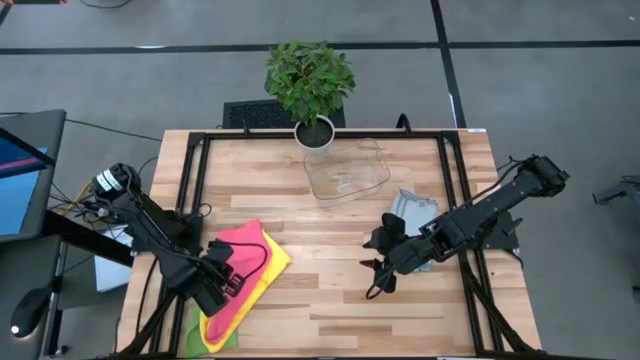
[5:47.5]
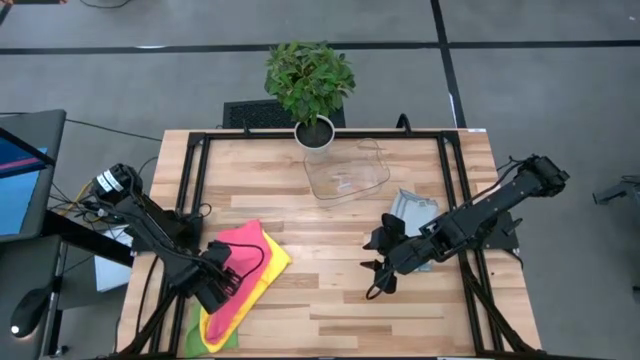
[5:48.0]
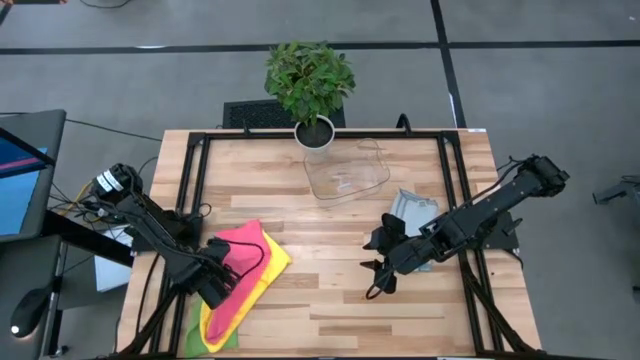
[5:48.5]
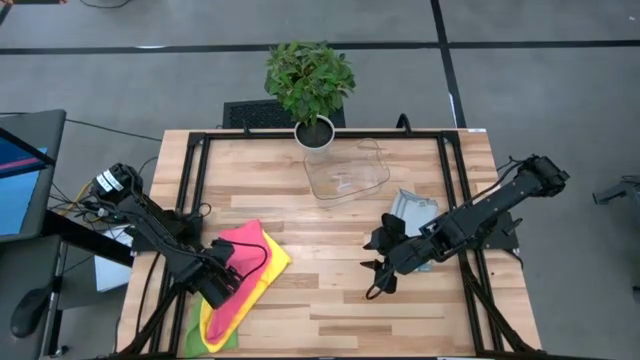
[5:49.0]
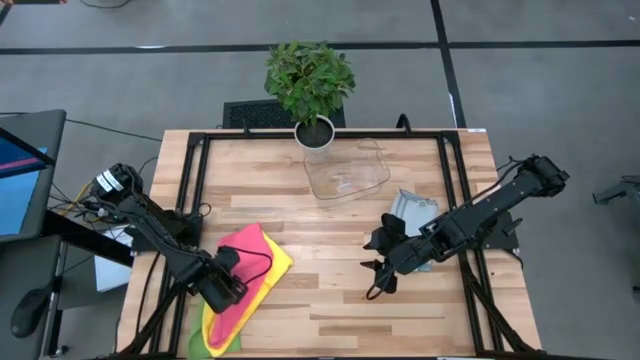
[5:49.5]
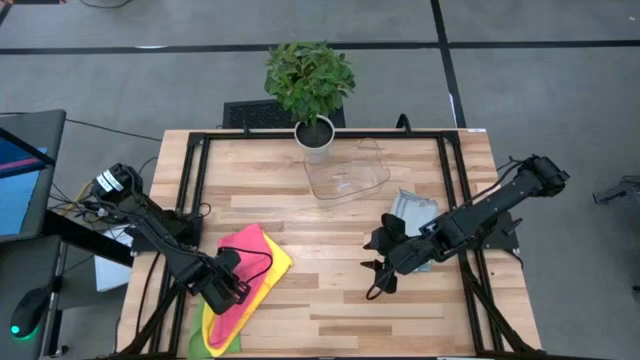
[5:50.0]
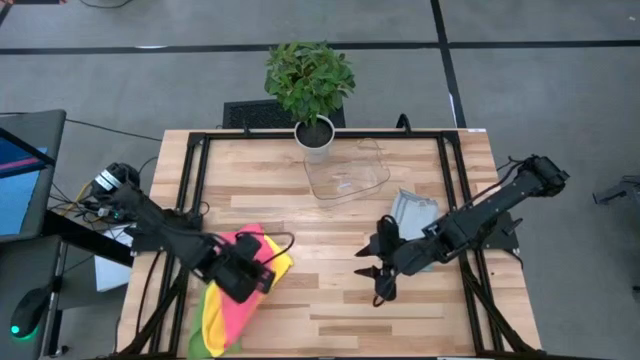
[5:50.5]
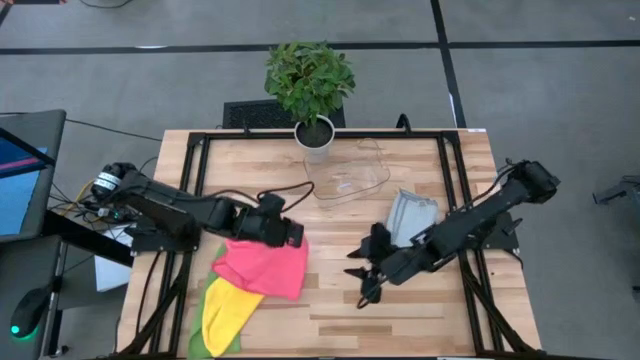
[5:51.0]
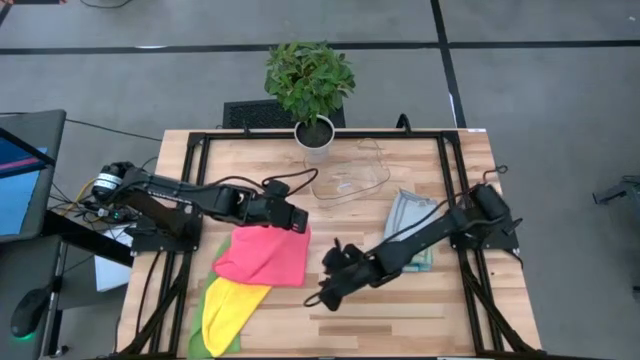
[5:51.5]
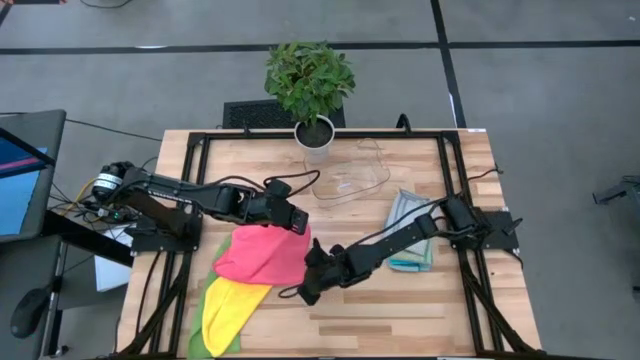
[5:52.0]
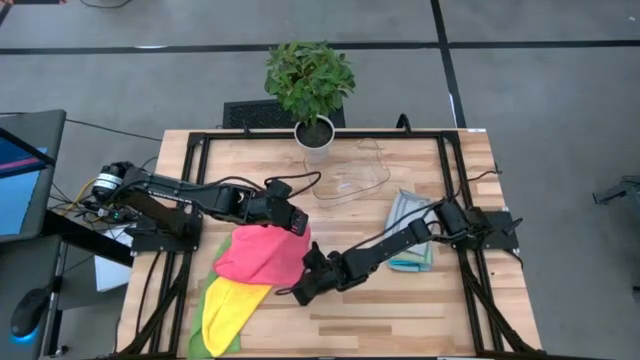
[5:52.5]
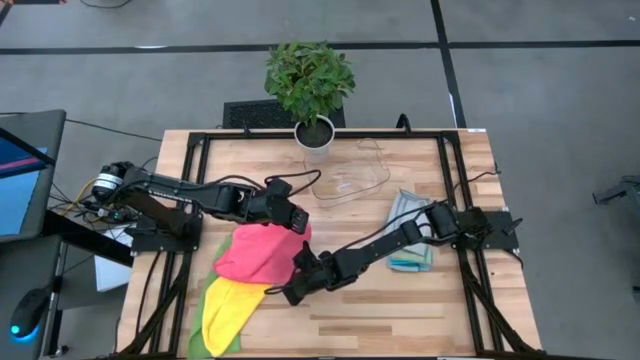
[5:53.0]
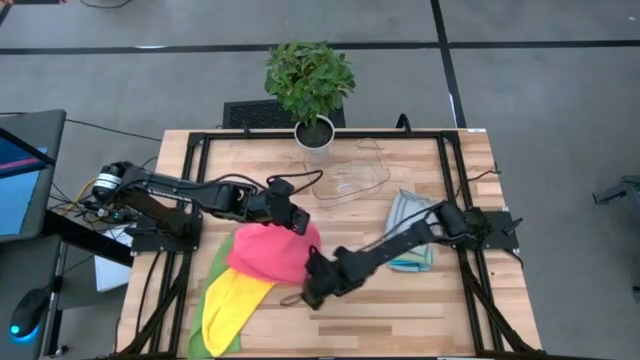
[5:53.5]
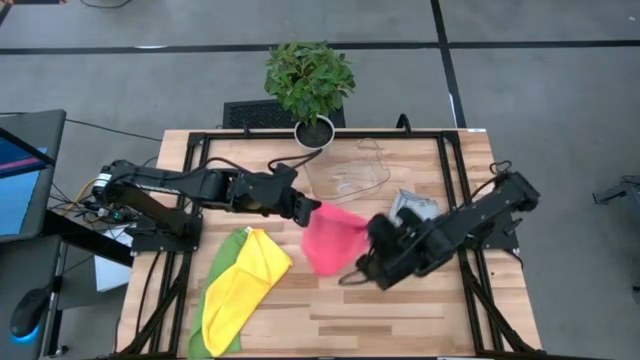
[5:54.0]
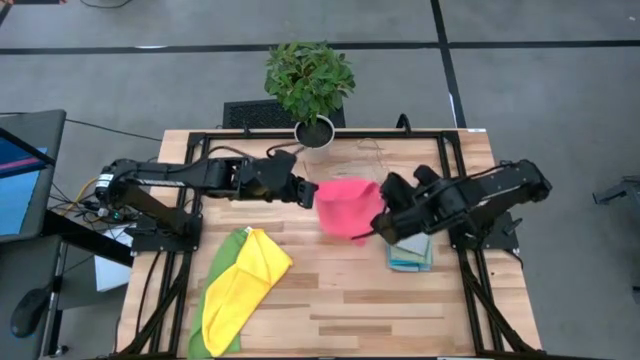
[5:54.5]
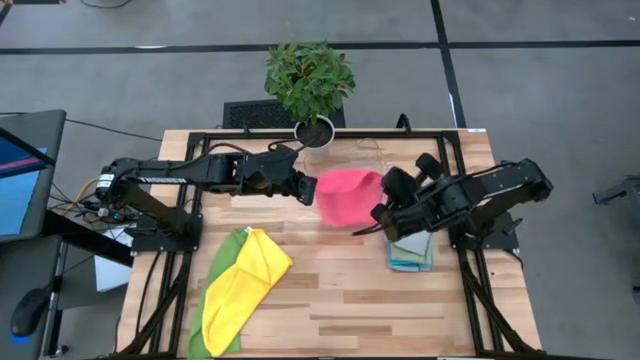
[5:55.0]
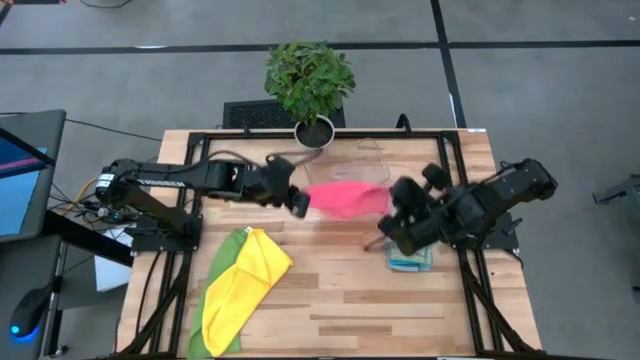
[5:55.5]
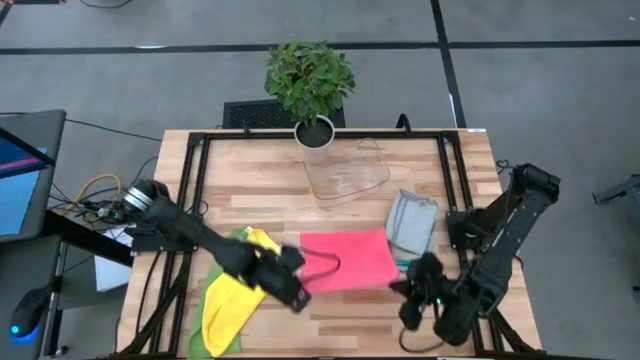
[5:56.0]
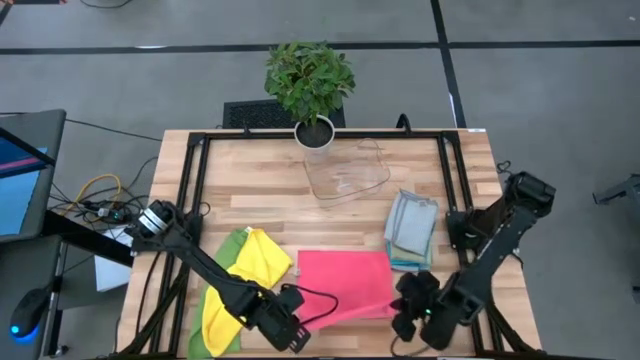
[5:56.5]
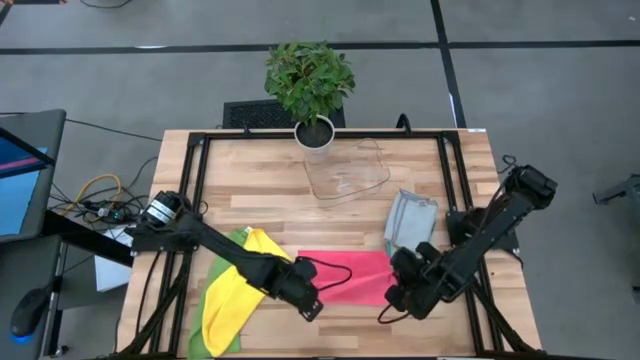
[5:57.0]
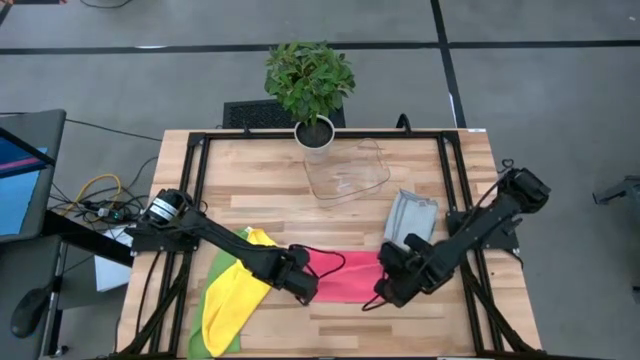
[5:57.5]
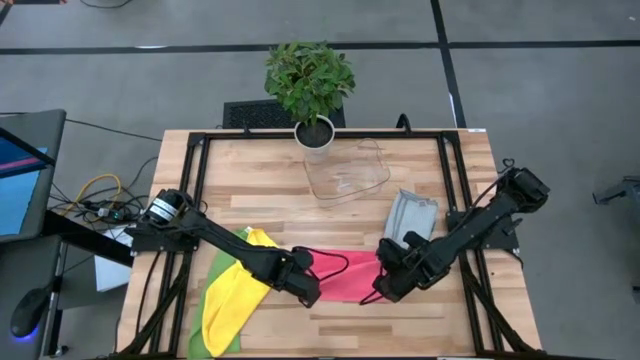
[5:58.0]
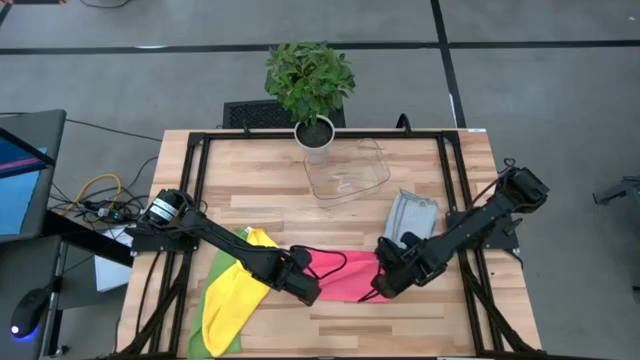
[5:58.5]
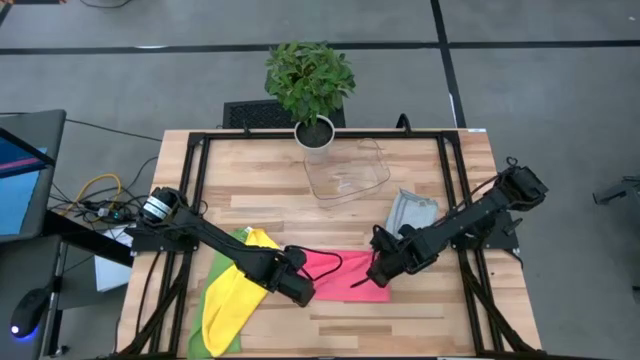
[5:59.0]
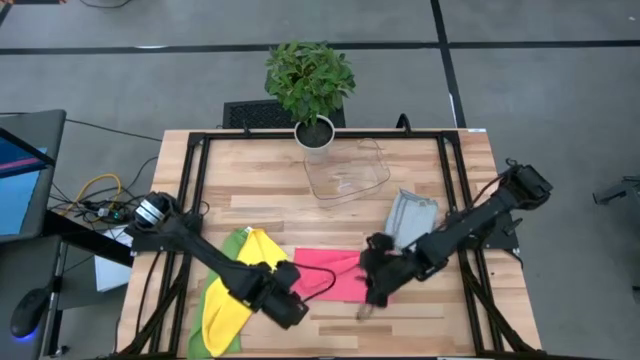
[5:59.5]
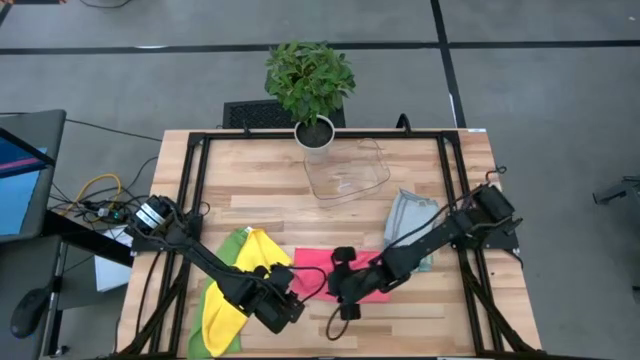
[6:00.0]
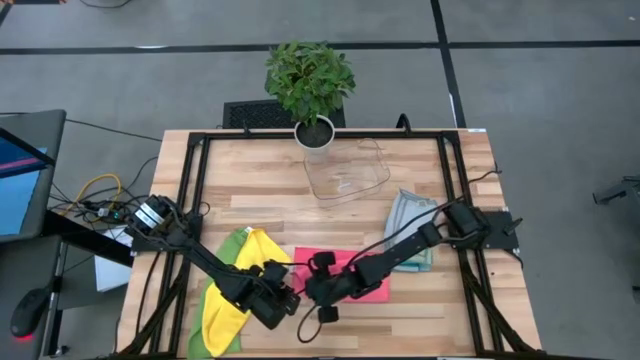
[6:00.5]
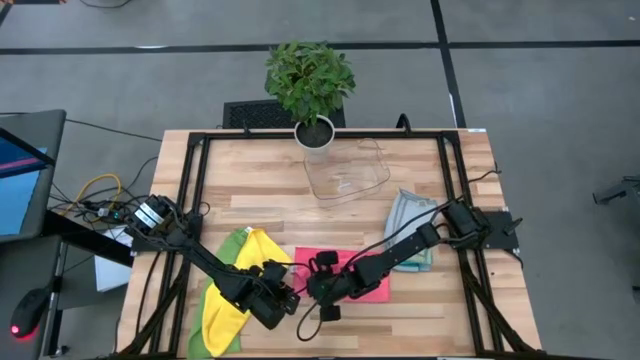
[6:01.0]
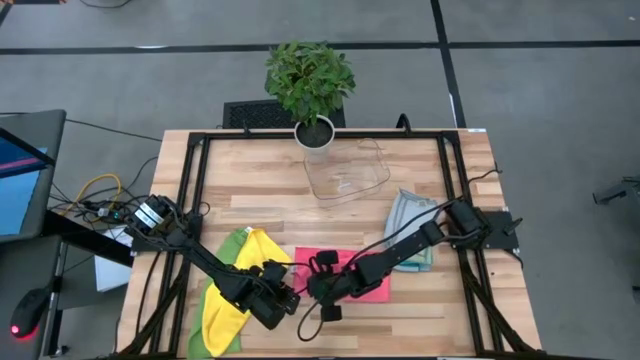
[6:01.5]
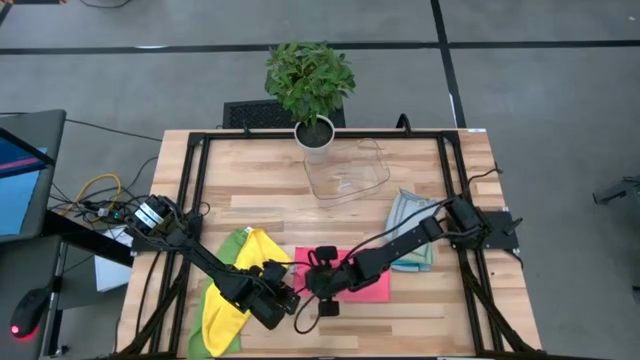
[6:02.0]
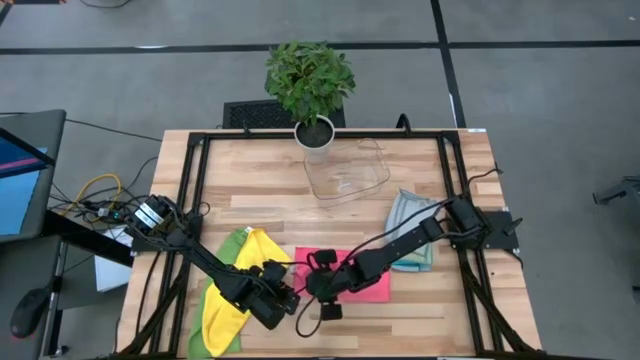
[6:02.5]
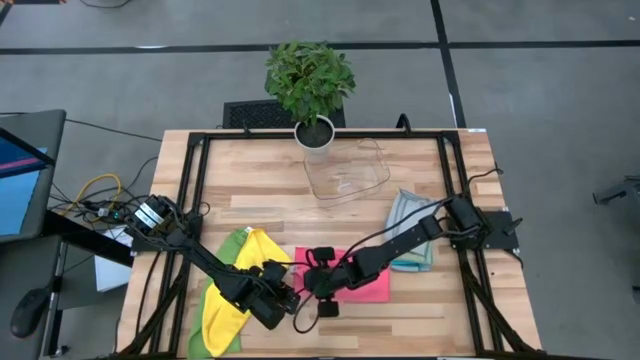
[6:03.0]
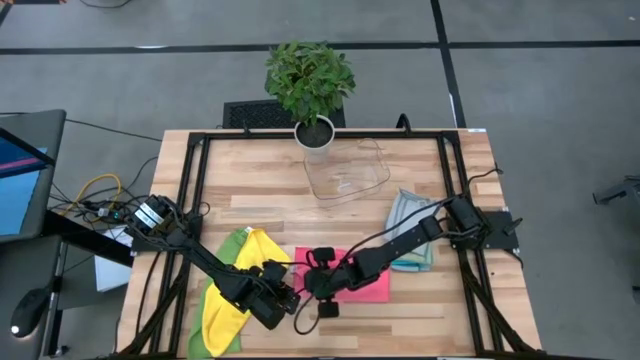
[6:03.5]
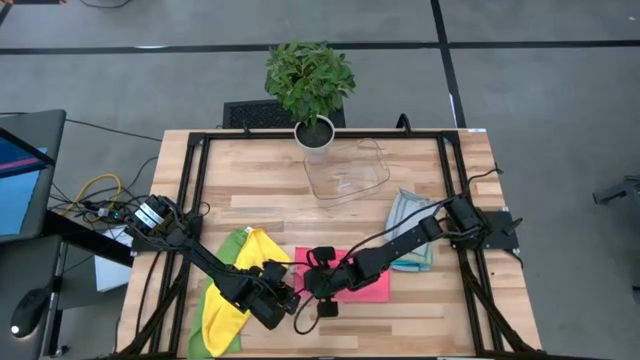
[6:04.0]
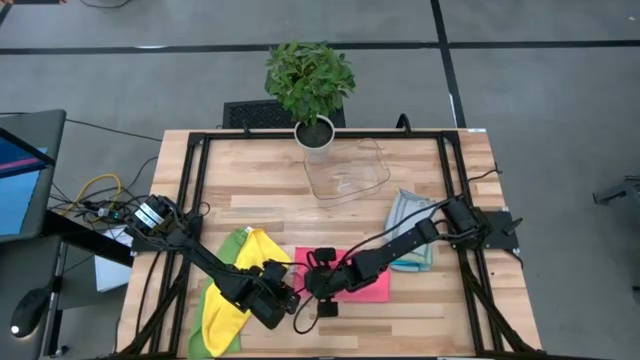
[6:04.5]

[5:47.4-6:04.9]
Task: Fold microfiber towels
Fold the pink microfiber cloth
